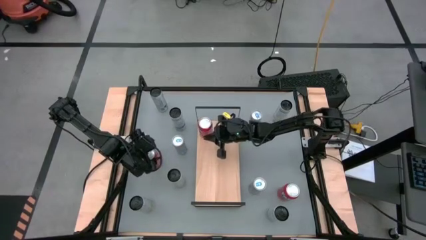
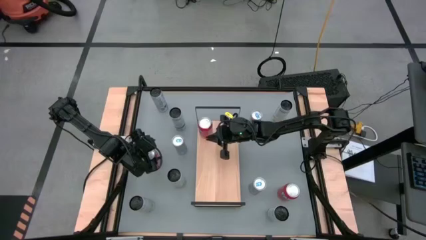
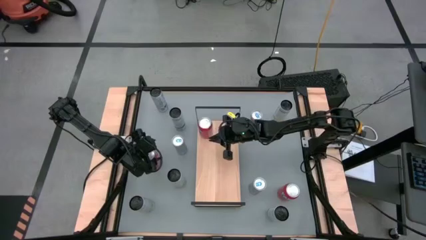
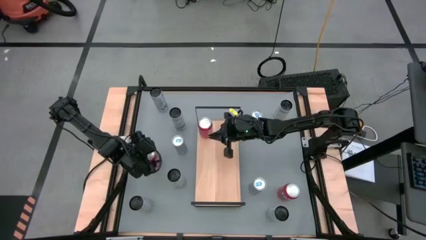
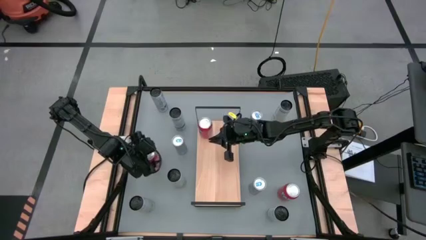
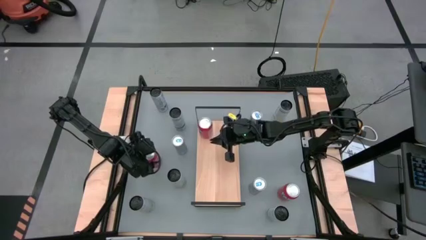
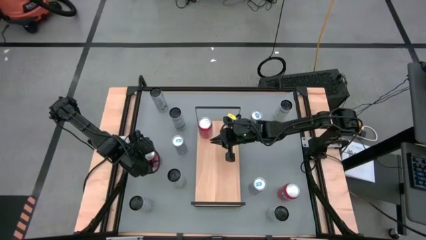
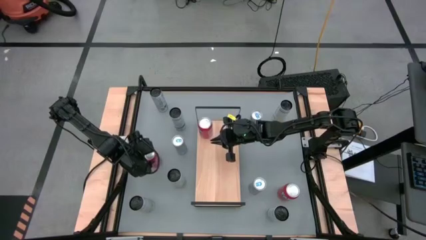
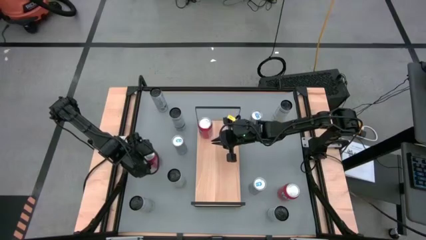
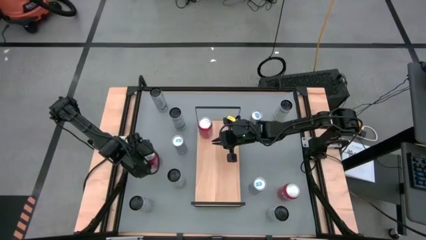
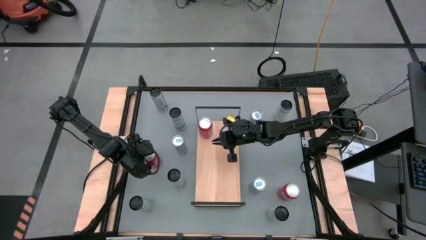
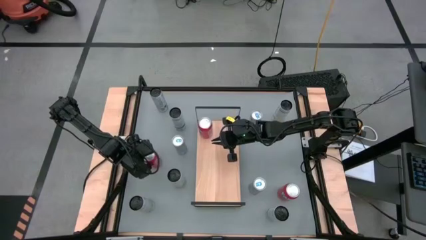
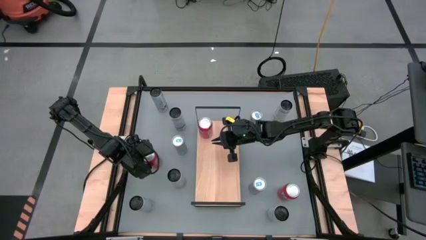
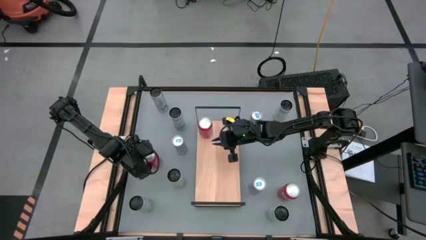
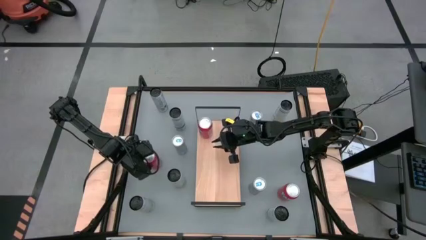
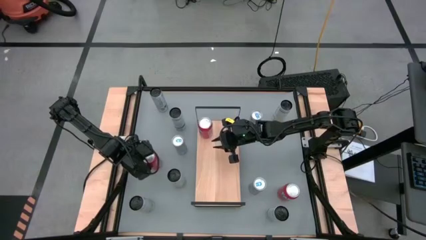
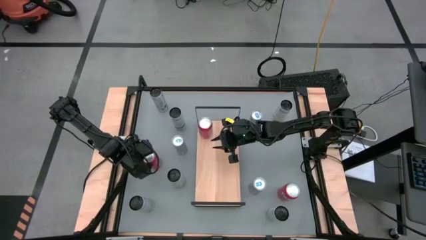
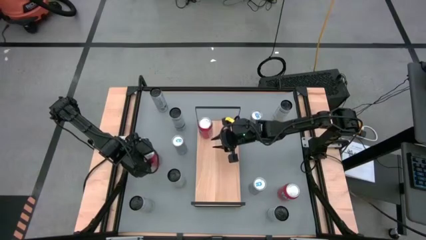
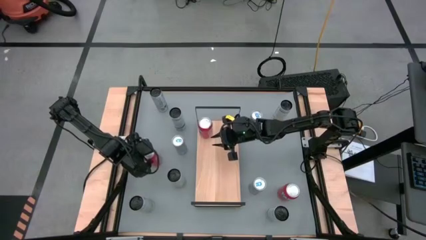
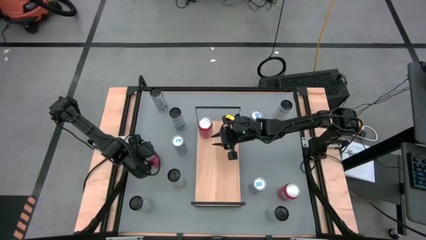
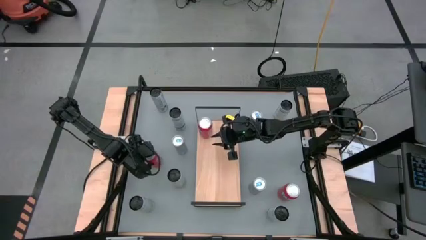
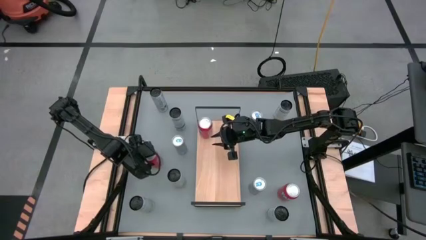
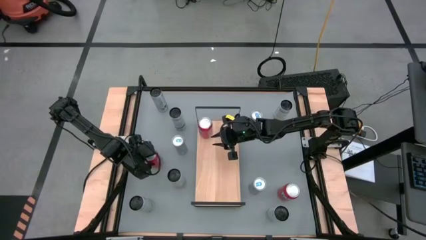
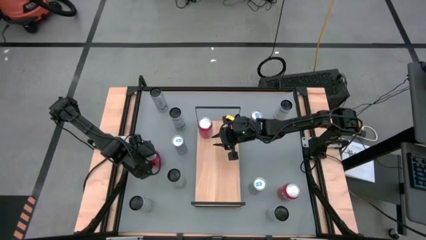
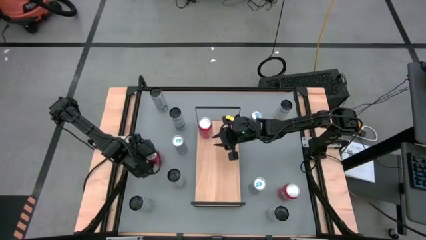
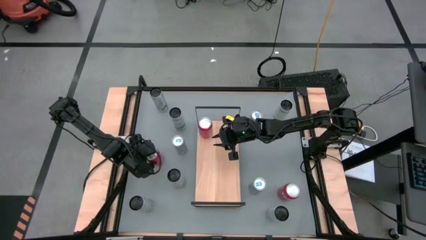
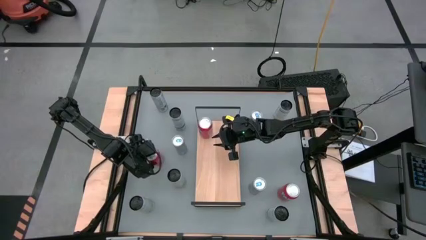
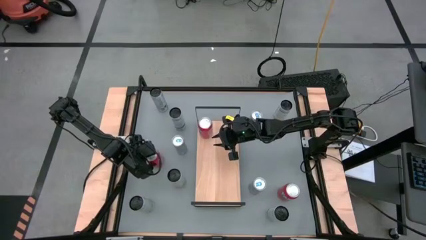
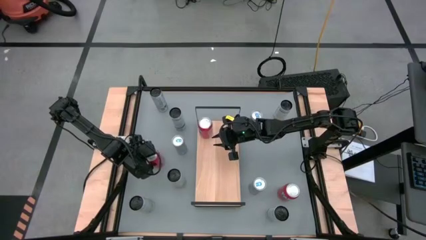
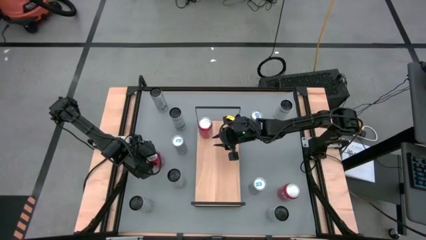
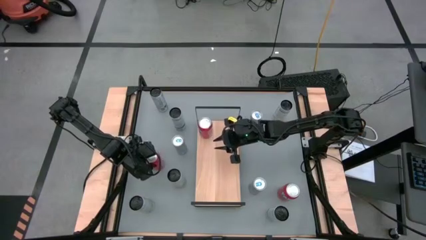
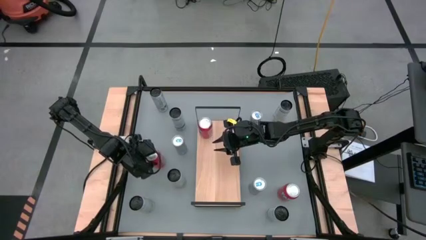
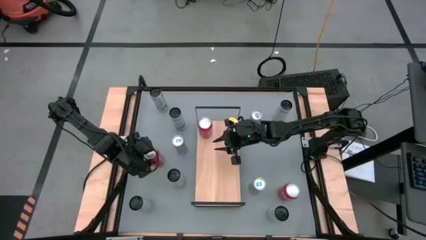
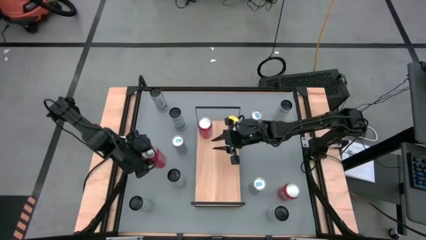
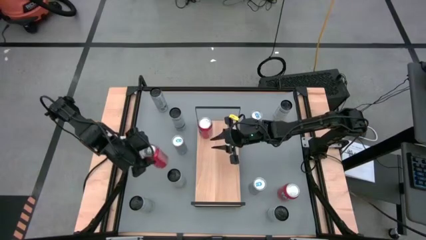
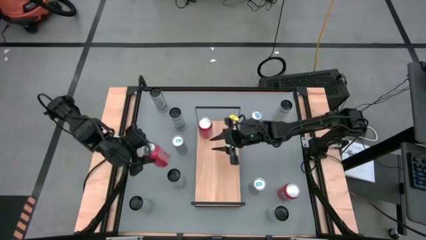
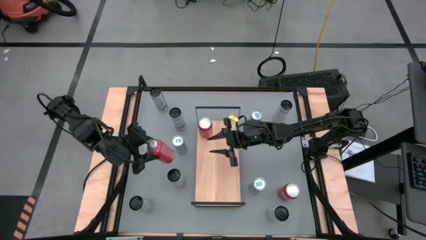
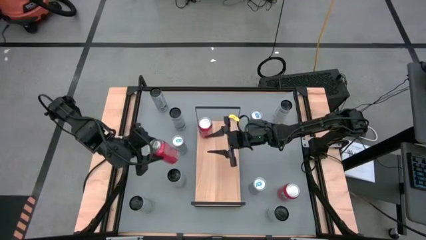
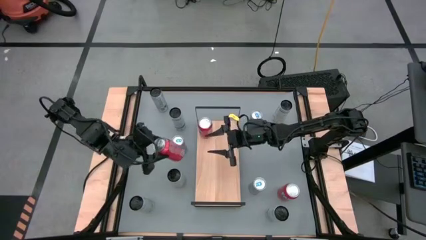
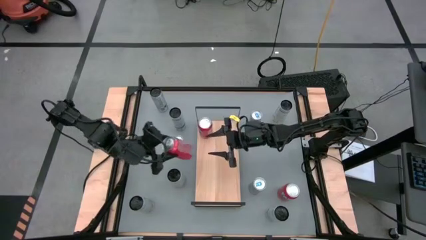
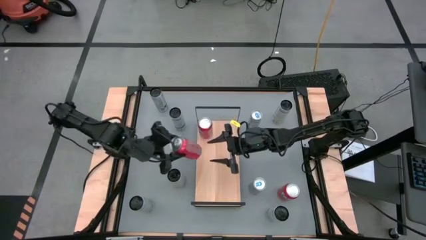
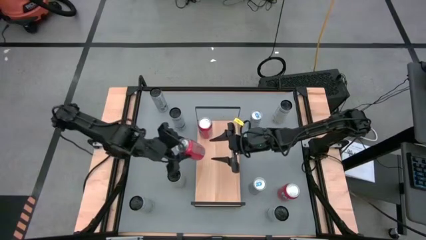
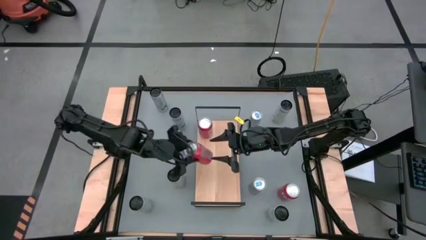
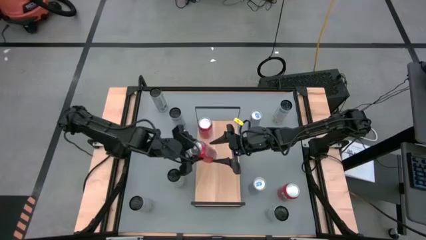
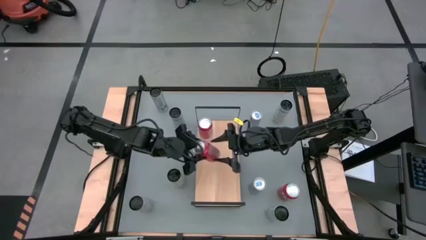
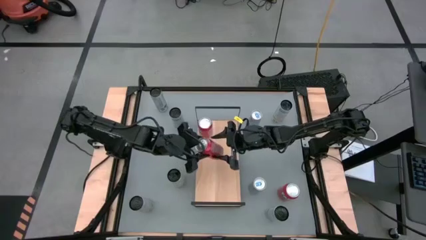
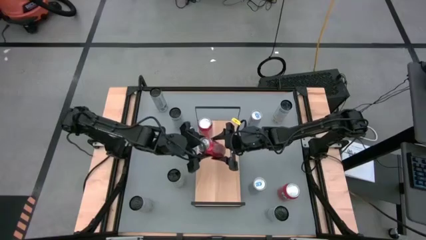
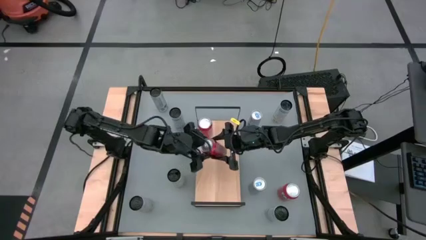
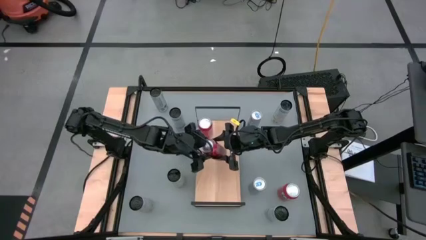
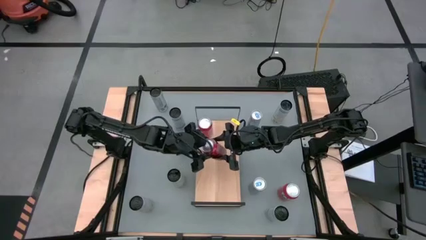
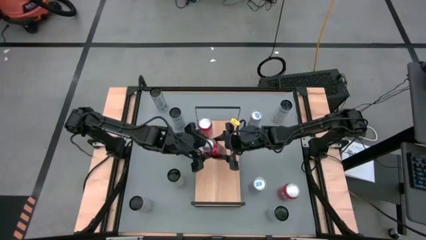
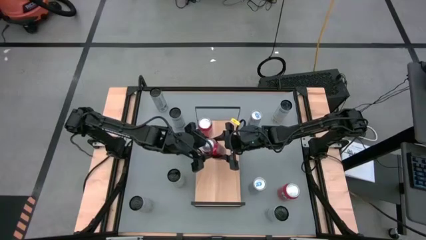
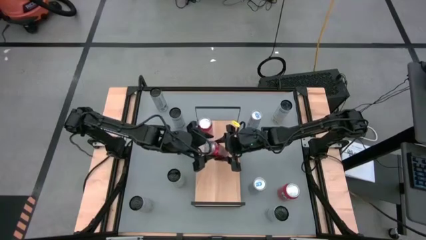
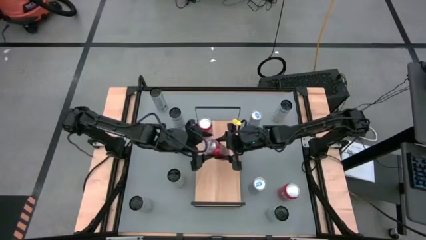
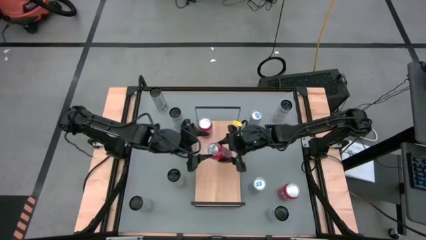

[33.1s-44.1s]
Task: Place canned beverage on shelf
Put the left red soda can aligned with the other red soda can on the shelf
